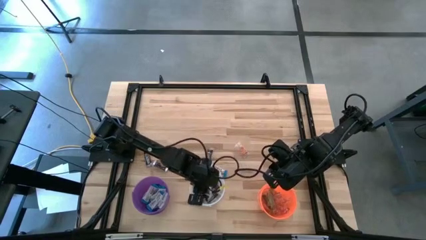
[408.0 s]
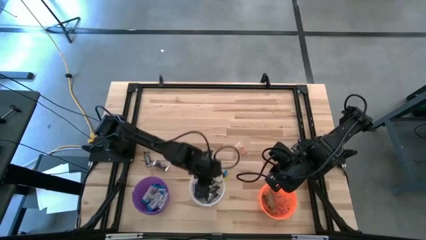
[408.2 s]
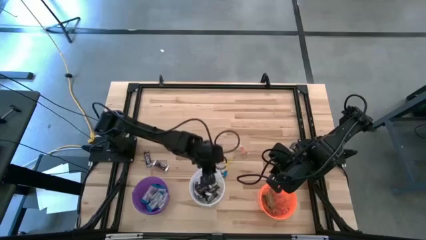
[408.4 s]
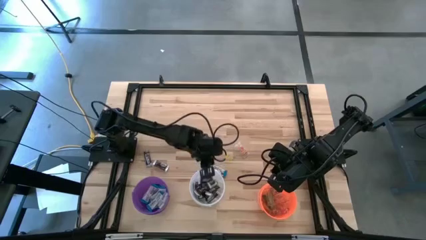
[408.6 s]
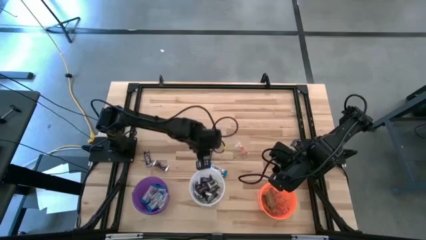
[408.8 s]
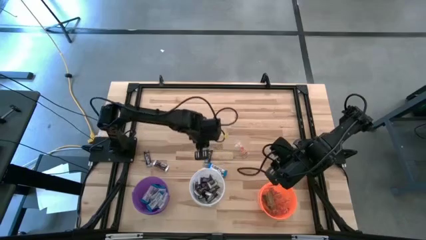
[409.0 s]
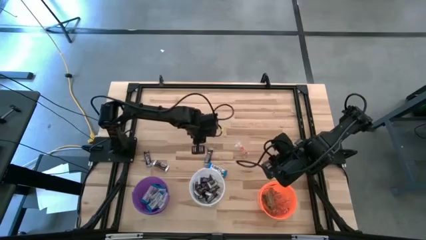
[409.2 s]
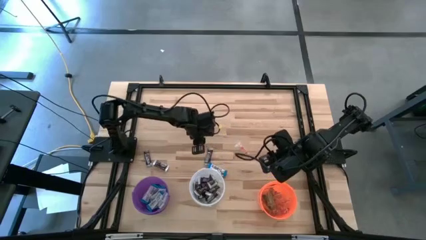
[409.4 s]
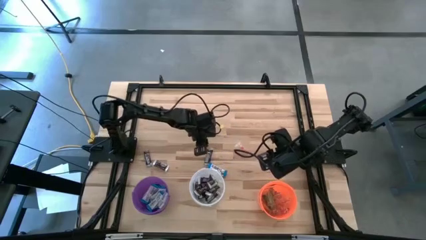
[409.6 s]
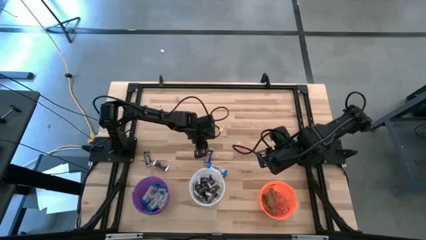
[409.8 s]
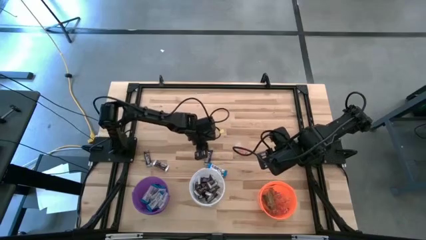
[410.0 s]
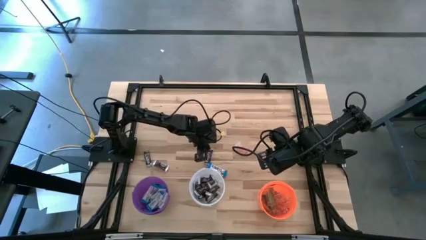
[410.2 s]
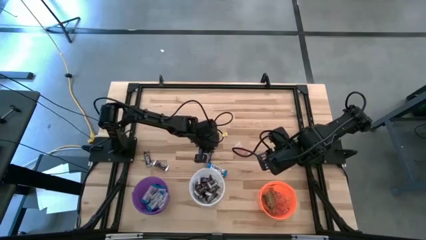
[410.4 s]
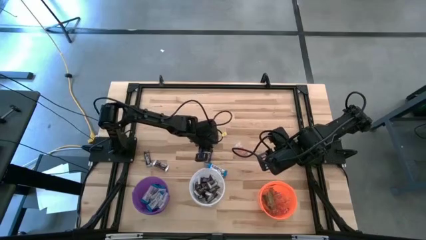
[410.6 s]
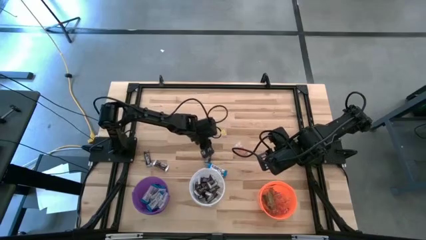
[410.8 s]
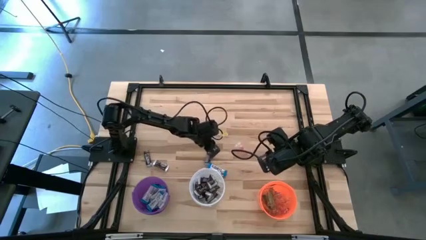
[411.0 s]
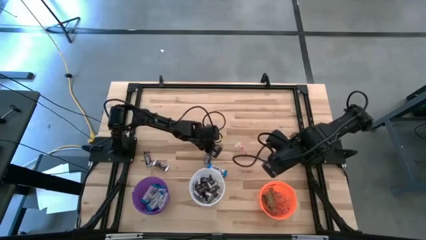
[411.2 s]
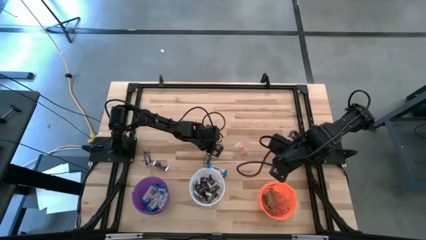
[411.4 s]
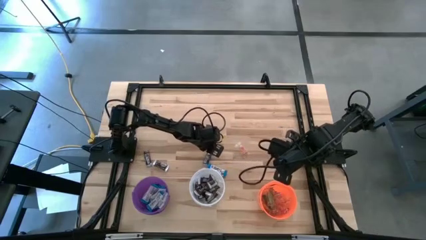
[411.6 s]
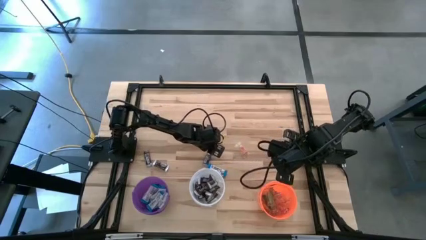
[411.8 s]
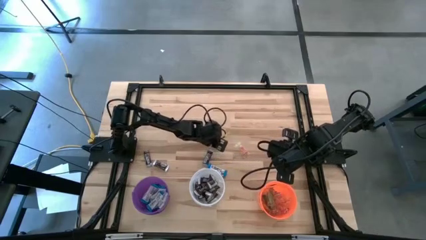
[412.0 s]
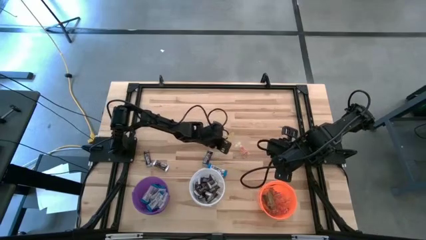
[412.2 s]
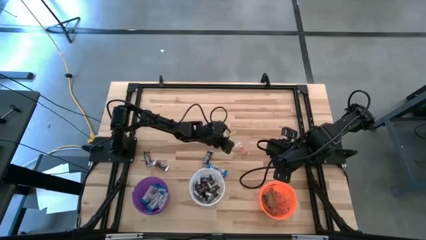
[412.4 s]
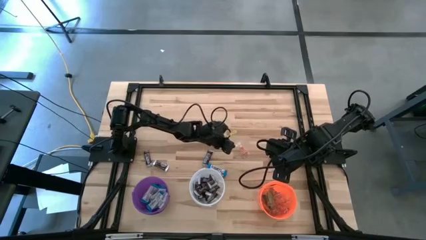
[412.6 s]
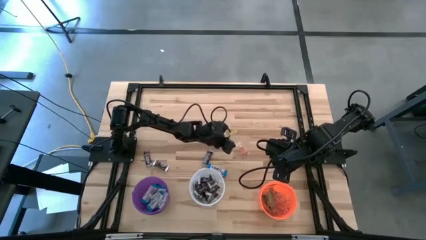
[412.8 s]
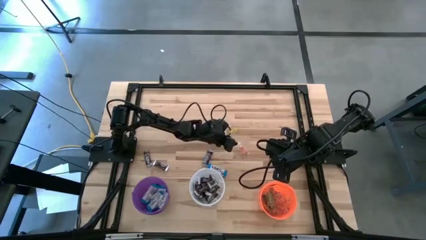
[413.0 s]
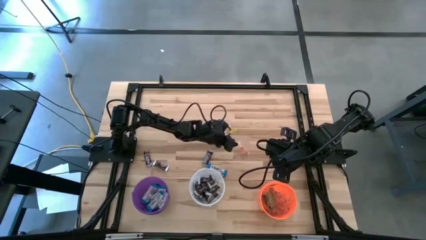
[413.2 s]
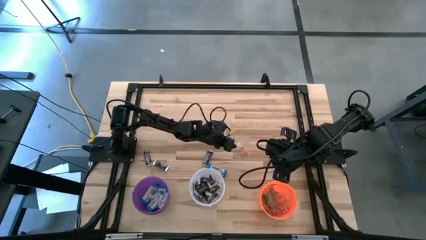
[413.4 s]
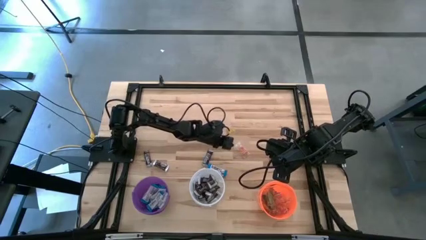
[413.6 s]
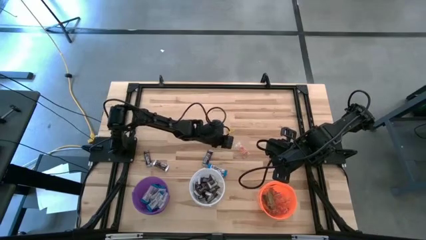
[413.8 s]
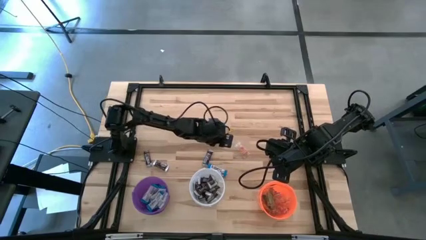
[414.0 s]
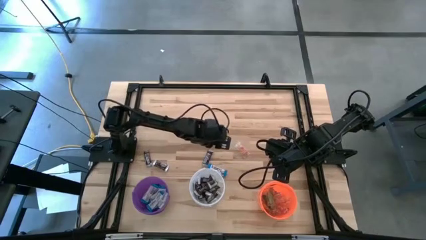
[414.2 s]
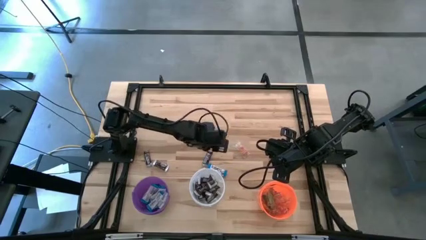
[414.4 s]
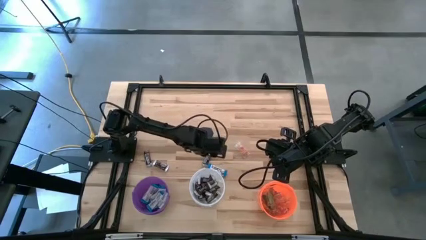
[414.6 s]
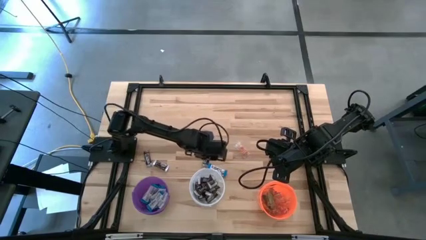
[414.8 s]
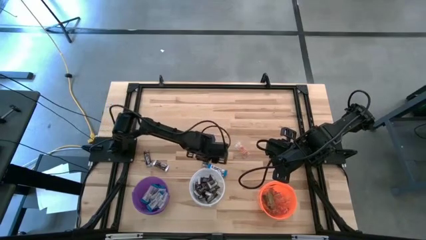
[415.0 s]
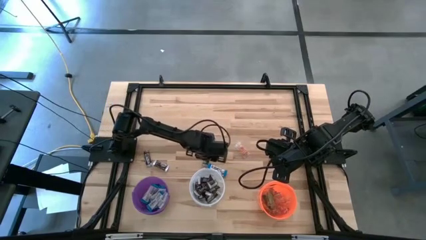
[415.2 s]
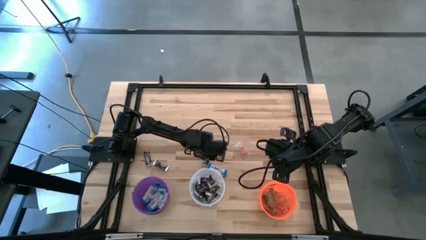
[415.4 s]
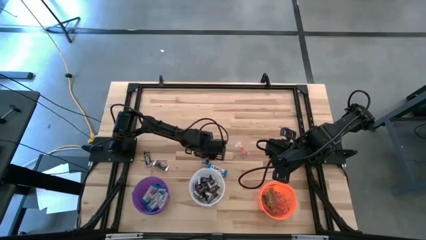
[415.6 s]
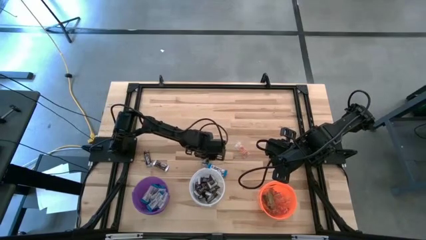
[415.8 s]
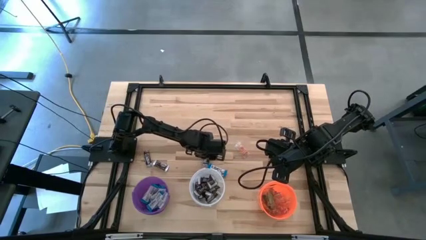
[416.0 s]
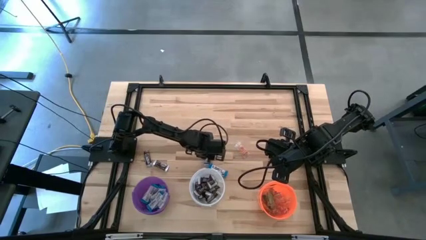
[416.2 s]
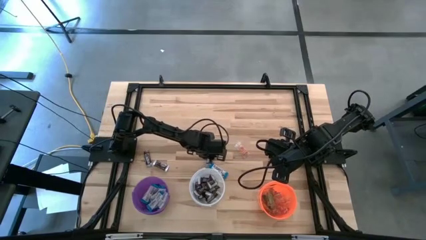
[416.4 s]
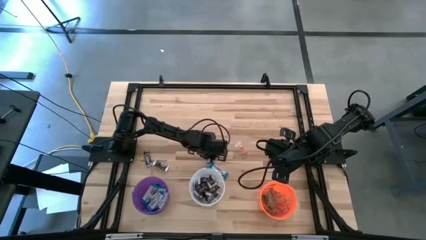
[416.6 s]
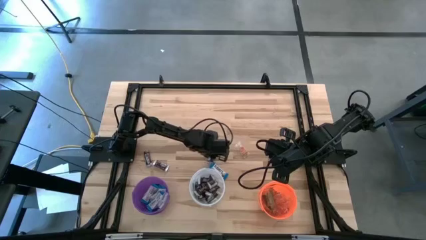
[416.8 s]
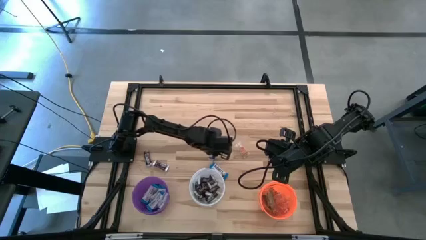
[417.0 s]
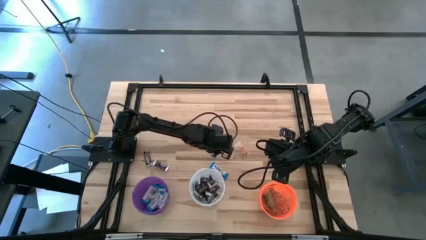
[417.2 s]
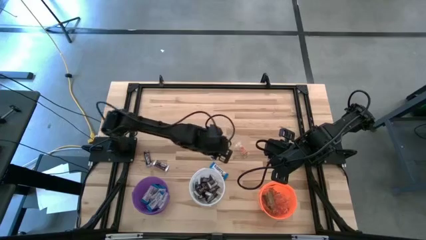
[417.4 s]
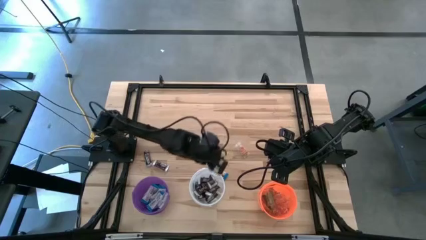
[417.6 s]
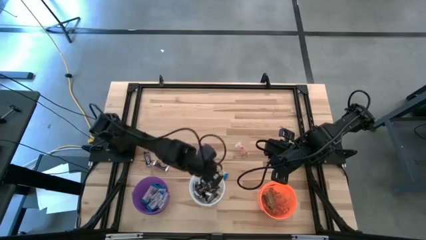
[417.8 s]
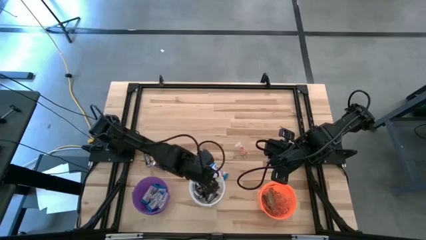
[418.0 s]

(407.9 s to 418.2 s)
Task: Sort candy
Put the brown chocolate into the white bucket

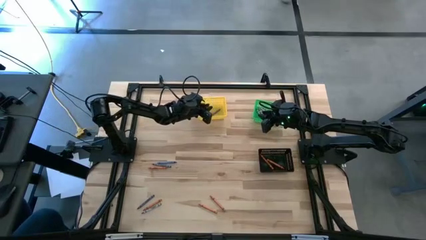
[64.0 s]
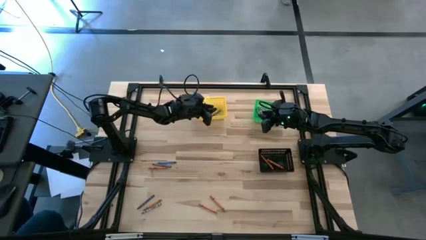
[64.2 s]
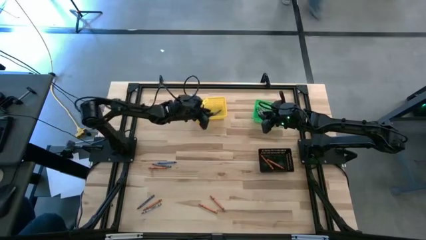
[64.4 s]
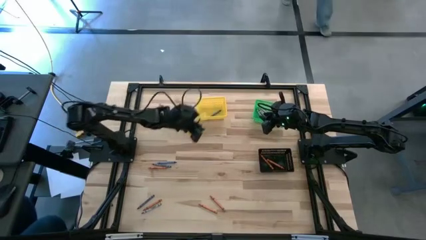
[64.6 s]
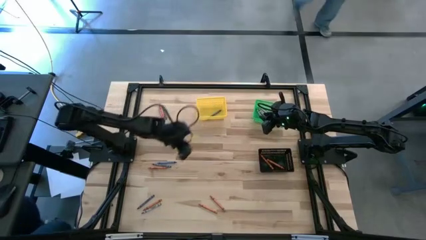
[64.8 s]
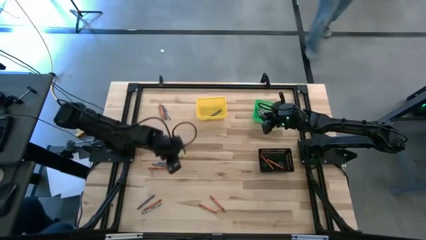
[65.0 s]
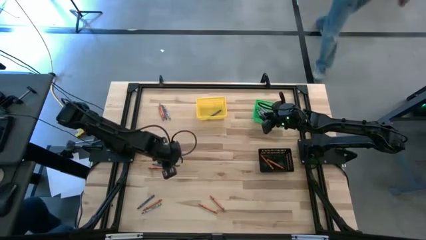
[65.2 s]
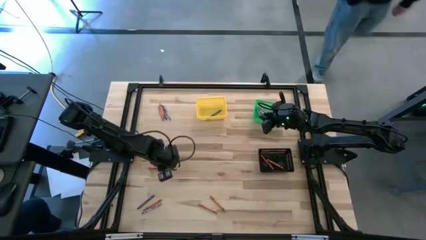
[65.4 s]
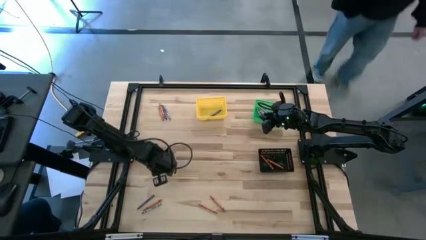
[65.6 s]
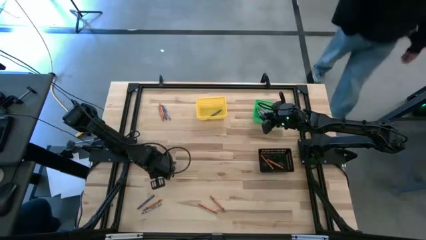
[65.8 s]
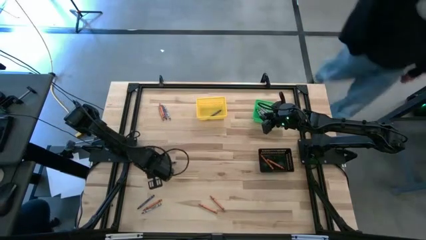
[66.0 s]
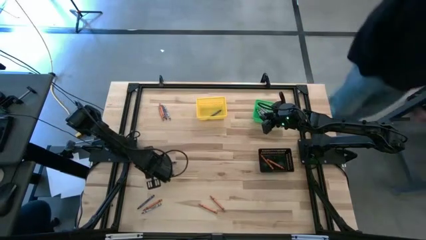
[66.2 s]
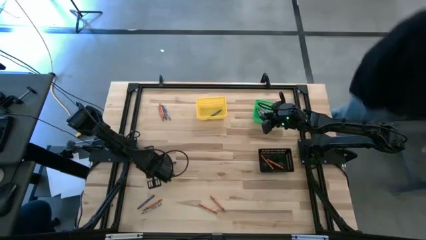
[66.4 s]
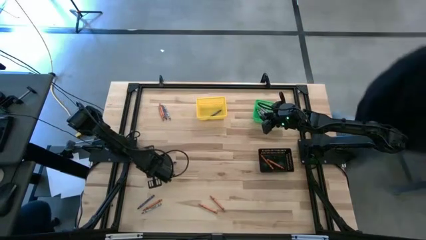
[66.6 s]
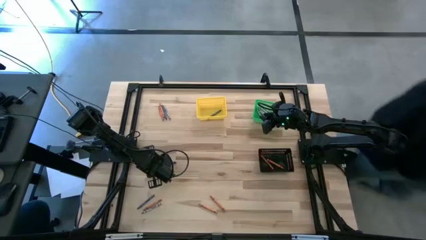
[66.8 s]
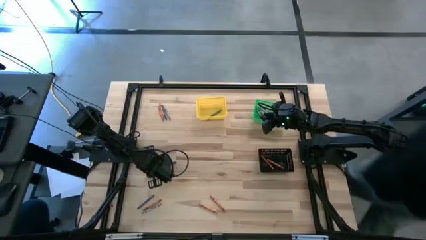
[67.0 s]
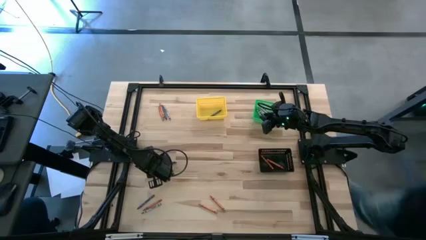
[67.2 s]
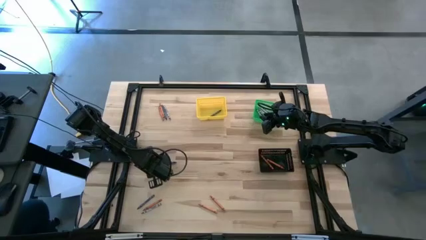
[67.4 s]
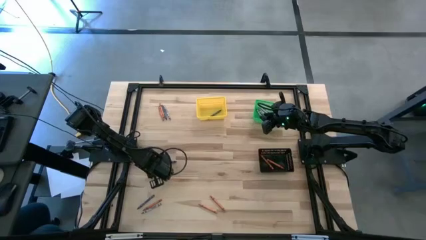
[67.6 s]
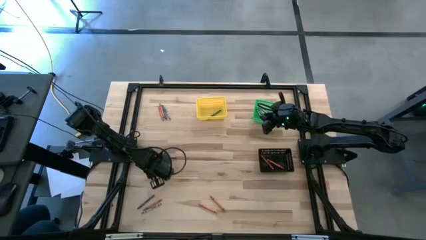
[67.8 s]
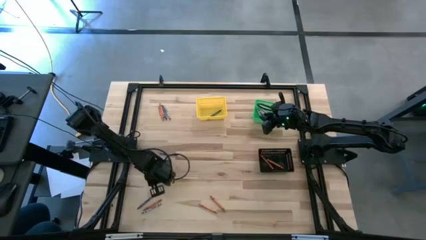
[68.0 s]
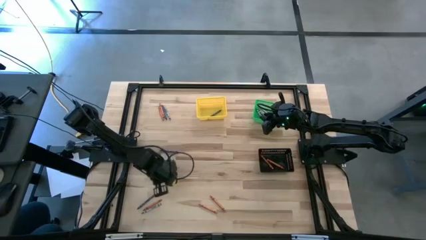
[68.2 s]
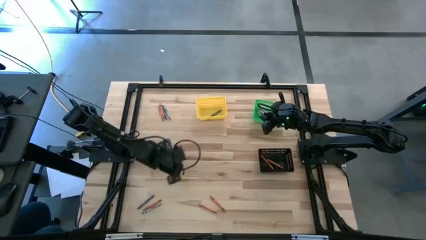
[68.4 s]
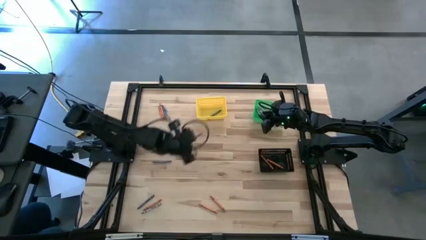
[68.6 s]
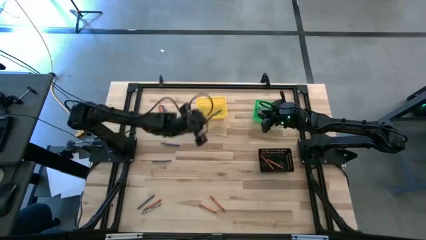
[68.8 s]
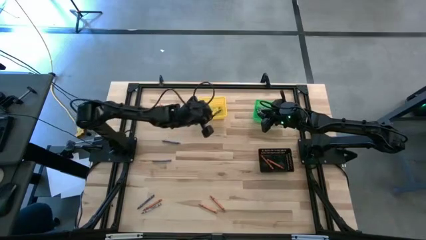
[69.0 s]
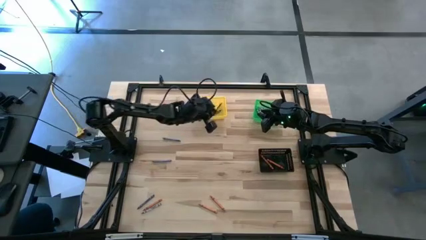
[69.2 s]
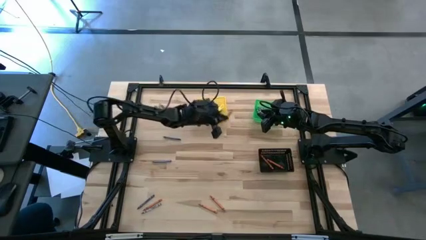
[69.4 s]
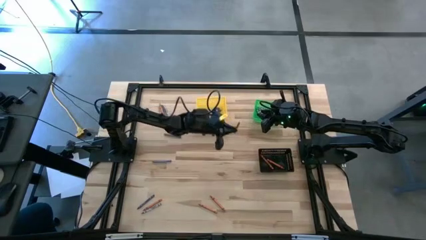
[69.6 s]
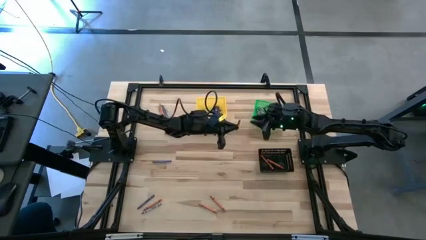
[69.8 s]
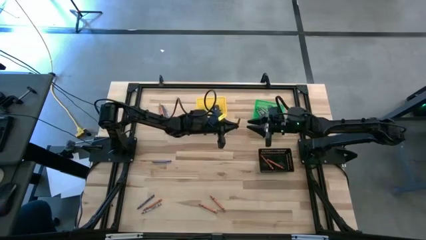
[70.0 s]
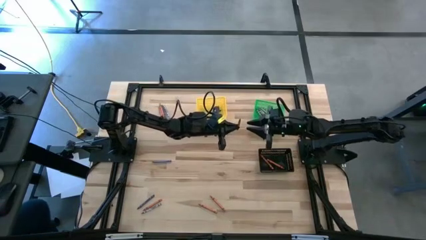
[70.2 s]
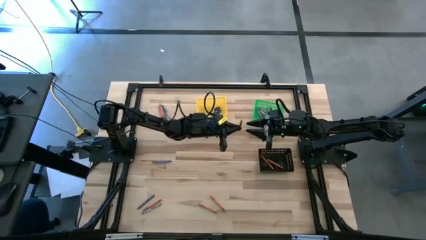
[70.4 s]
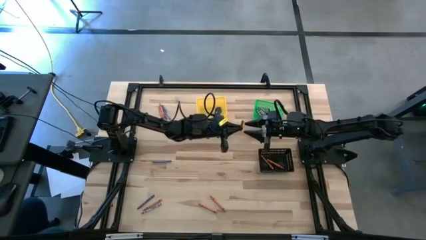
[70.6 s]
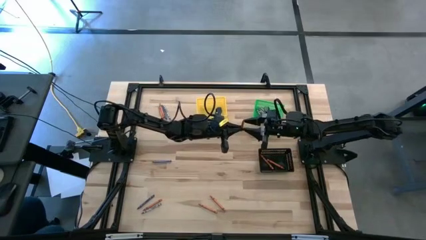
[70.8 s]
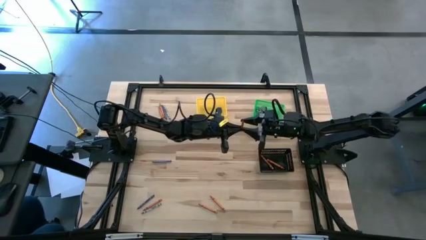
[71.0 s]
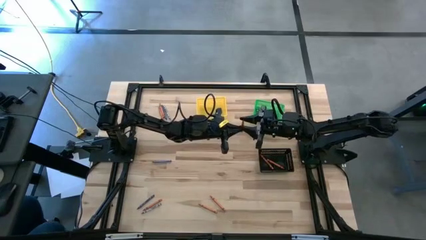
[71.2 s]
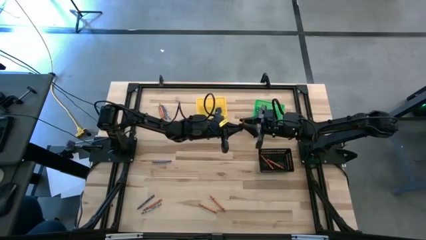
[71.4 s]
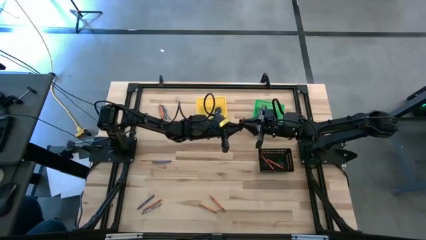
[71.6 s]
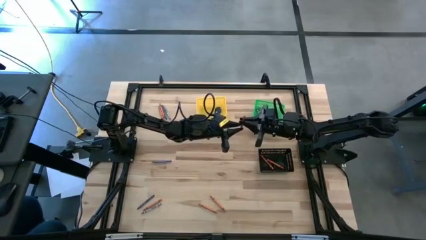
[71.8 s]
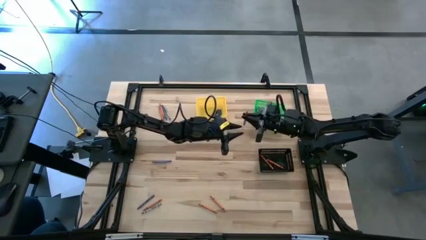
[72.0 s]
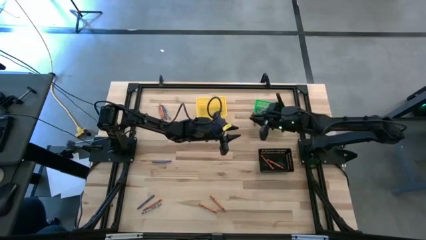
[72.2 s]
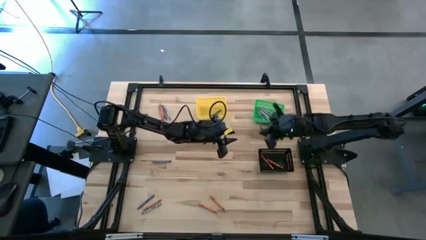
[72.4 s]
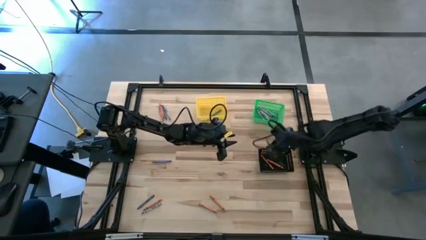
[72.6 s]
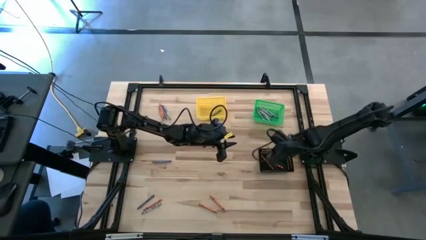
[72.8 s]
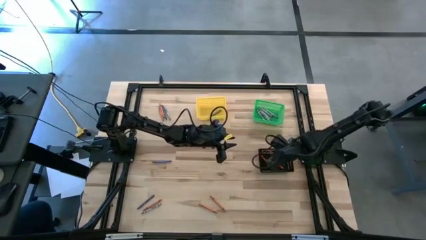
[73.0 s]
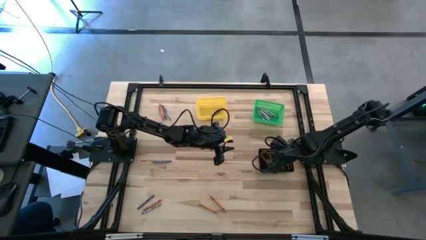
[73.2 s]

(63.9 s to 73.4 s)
Task: Sort crayons
Put the orange crayon into the black basket
